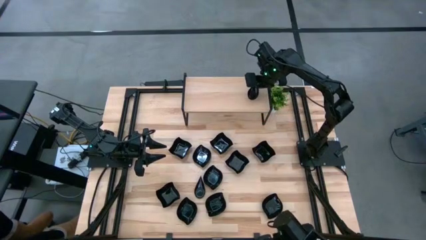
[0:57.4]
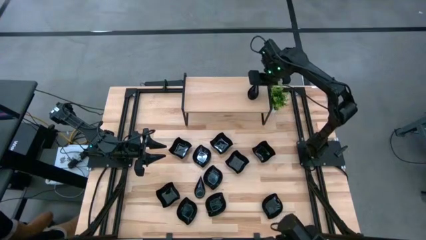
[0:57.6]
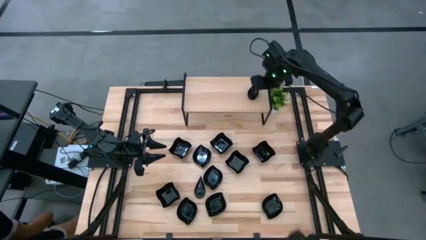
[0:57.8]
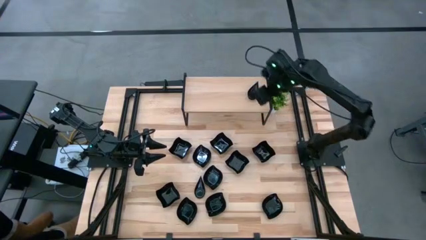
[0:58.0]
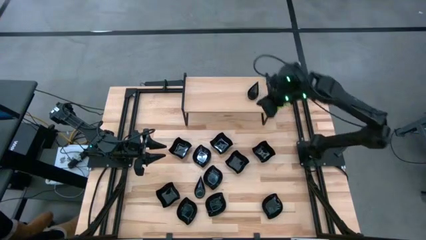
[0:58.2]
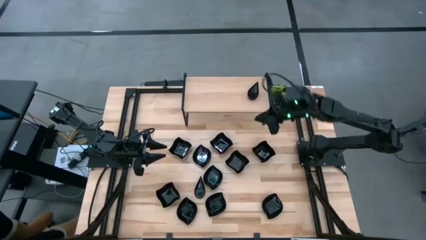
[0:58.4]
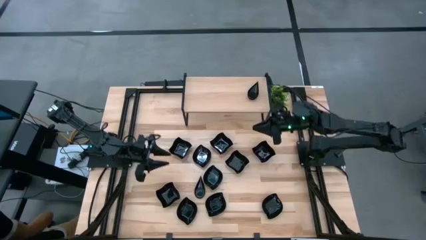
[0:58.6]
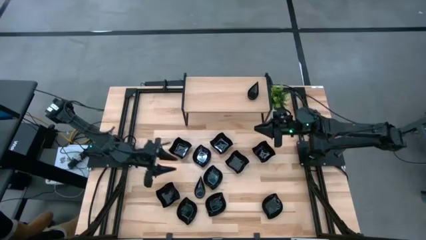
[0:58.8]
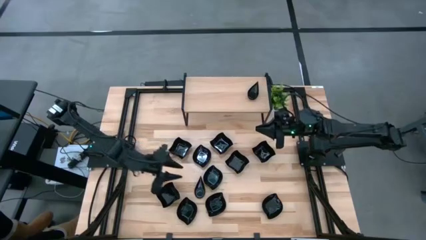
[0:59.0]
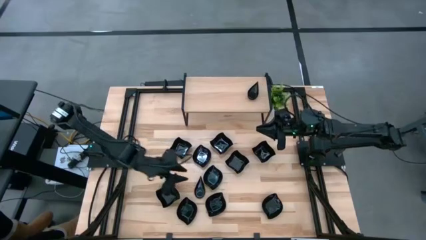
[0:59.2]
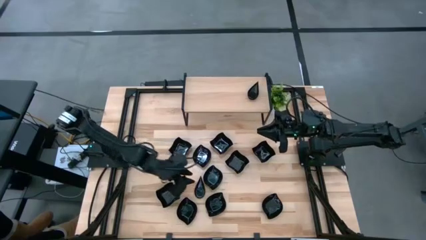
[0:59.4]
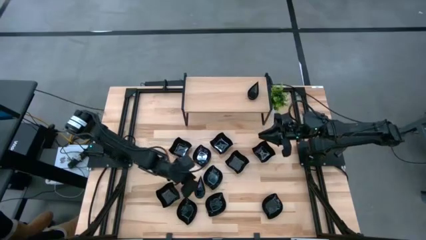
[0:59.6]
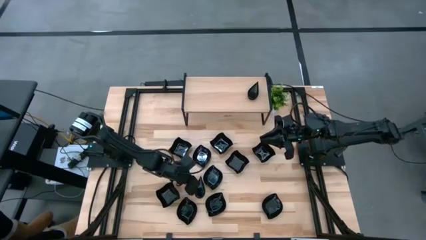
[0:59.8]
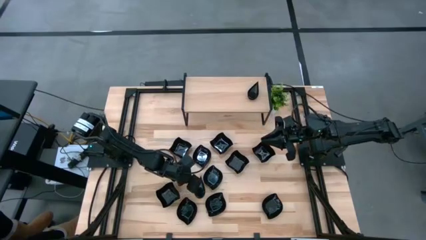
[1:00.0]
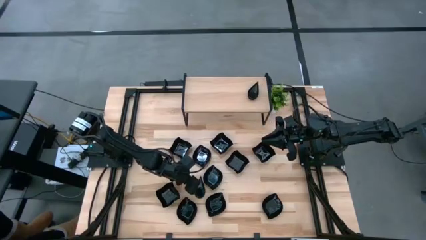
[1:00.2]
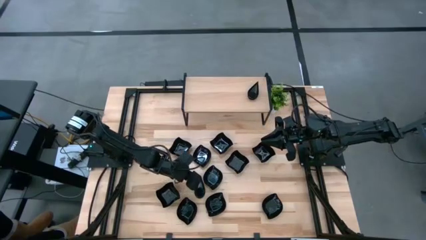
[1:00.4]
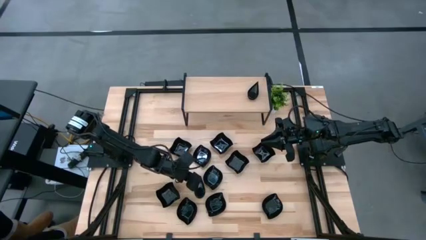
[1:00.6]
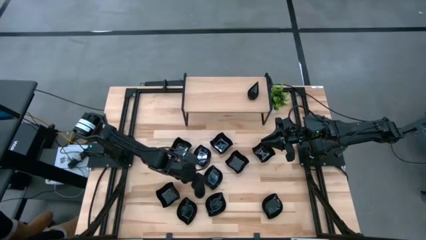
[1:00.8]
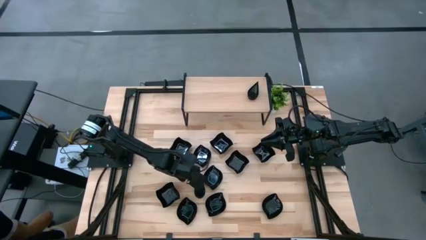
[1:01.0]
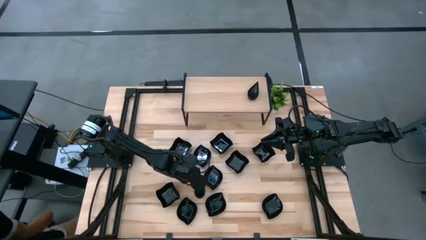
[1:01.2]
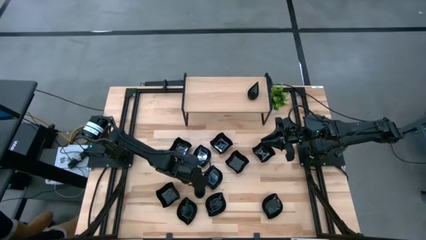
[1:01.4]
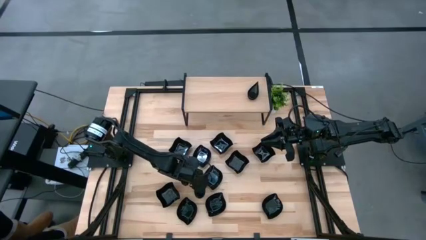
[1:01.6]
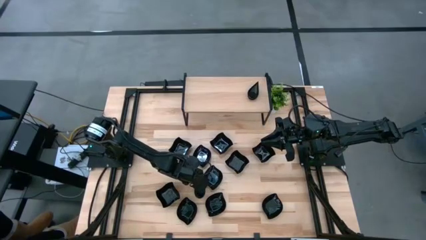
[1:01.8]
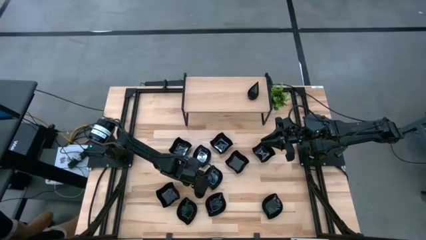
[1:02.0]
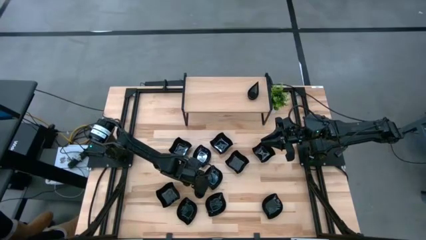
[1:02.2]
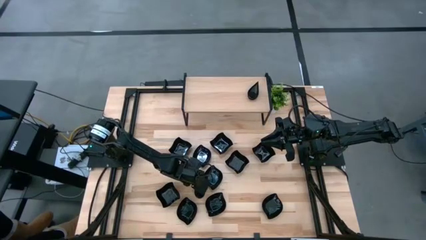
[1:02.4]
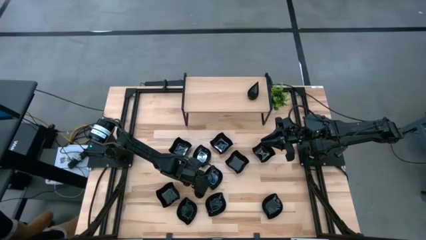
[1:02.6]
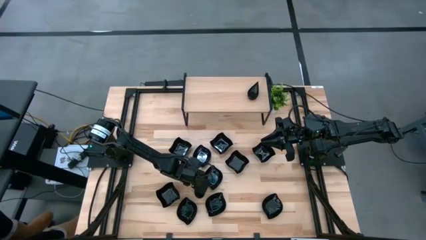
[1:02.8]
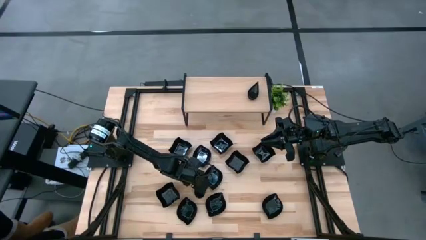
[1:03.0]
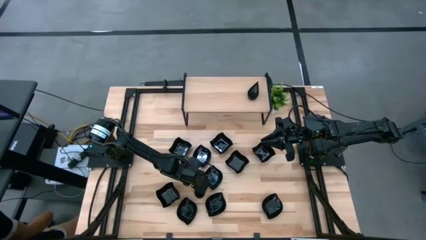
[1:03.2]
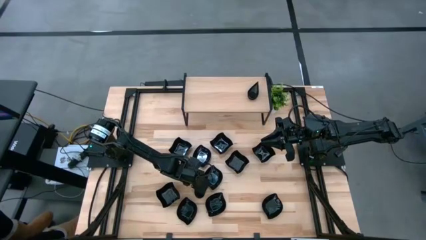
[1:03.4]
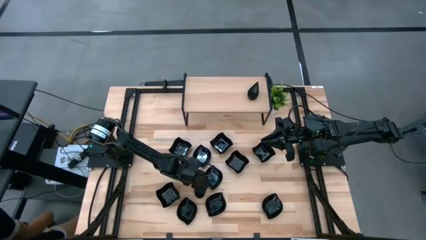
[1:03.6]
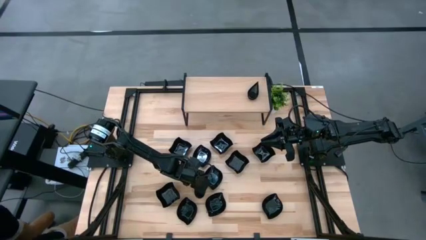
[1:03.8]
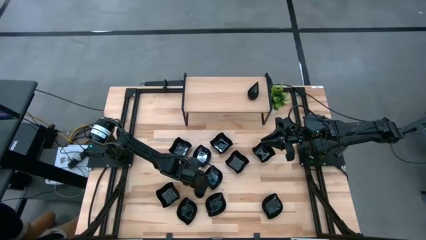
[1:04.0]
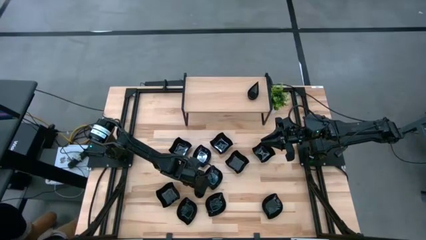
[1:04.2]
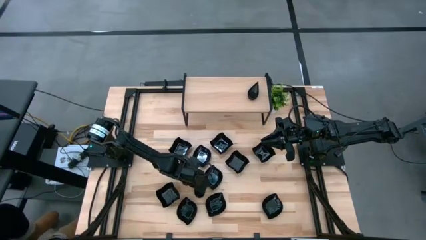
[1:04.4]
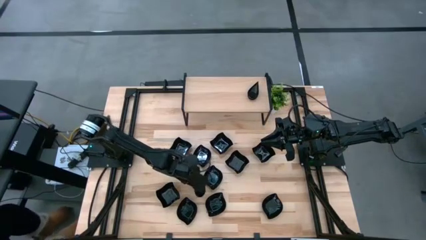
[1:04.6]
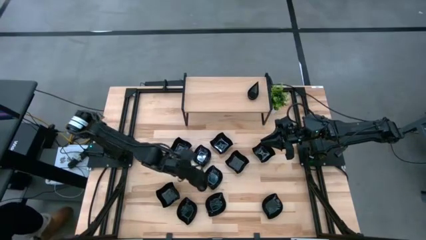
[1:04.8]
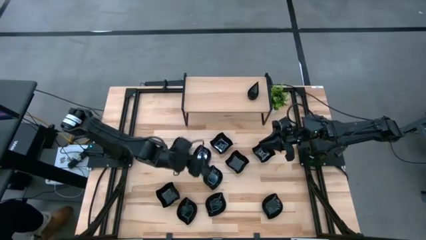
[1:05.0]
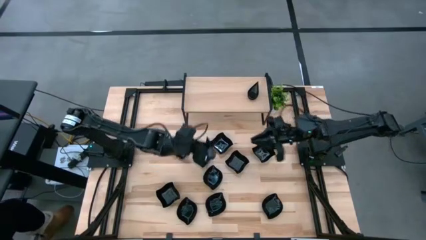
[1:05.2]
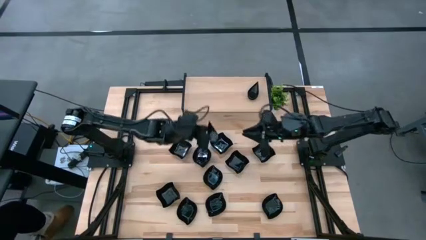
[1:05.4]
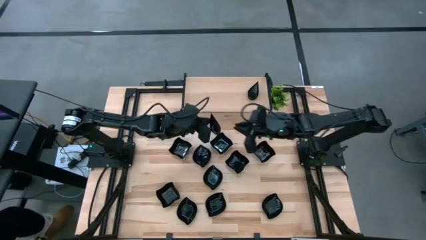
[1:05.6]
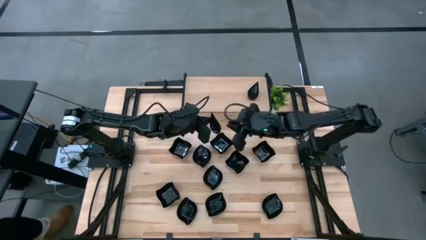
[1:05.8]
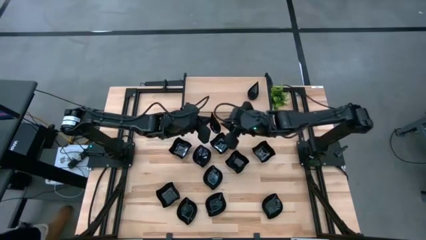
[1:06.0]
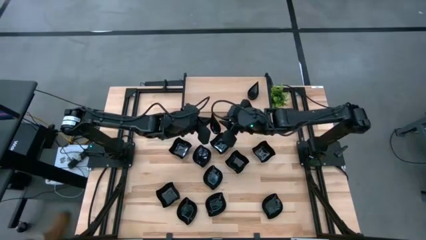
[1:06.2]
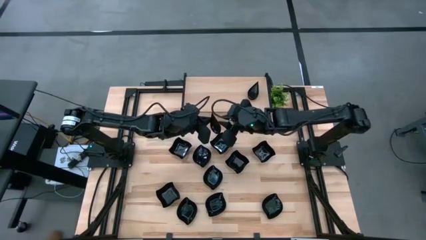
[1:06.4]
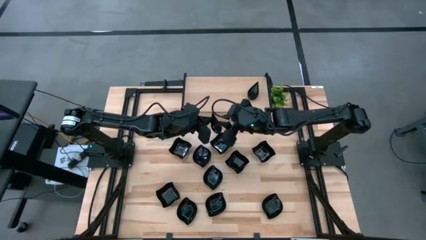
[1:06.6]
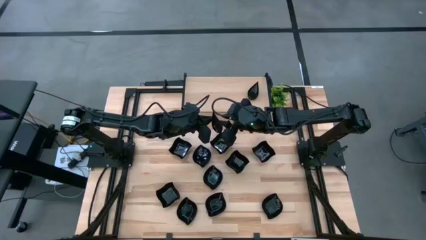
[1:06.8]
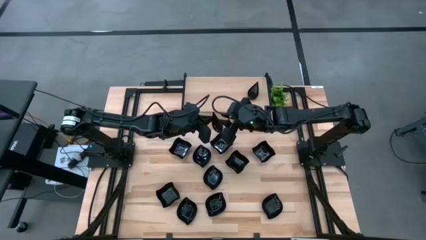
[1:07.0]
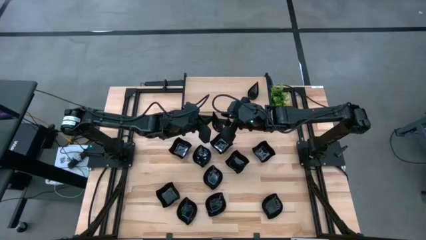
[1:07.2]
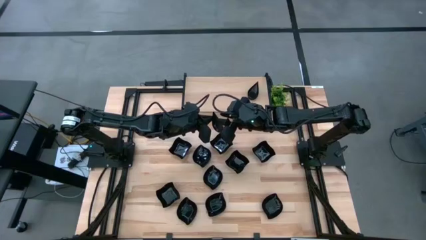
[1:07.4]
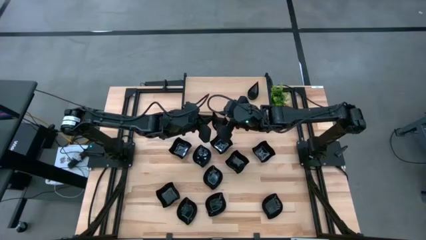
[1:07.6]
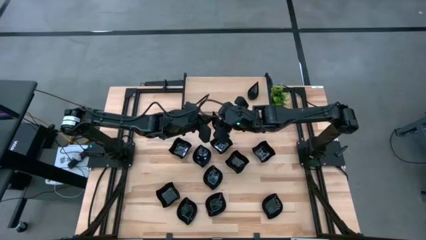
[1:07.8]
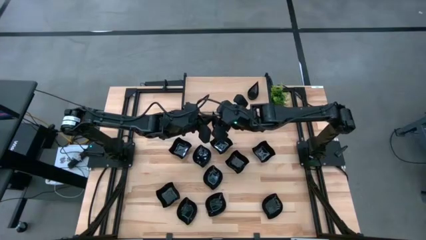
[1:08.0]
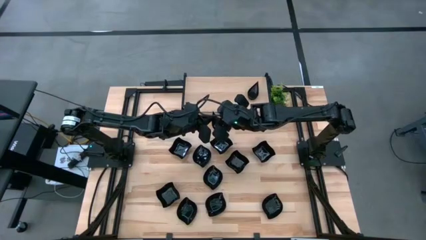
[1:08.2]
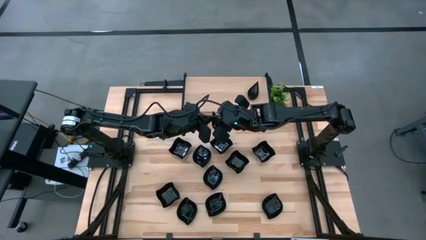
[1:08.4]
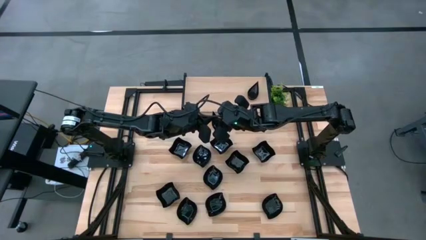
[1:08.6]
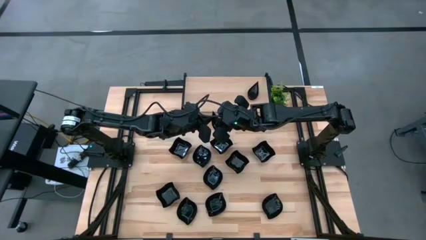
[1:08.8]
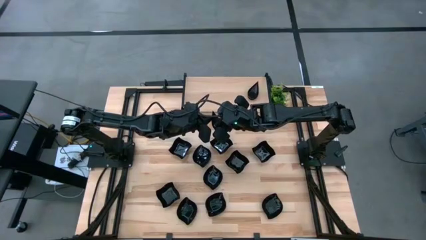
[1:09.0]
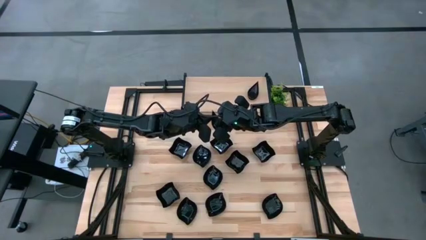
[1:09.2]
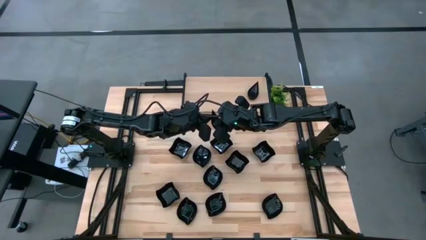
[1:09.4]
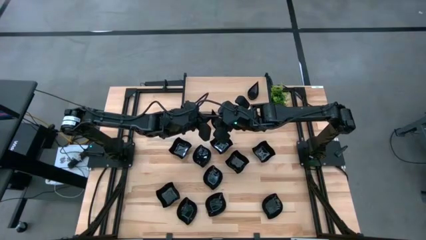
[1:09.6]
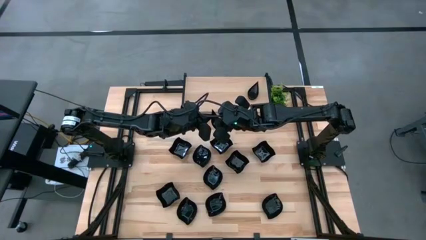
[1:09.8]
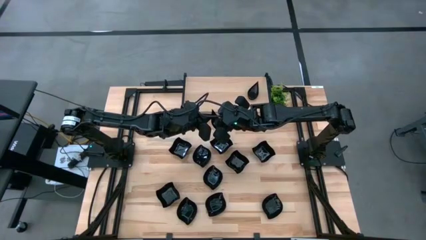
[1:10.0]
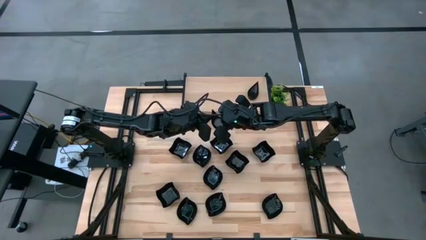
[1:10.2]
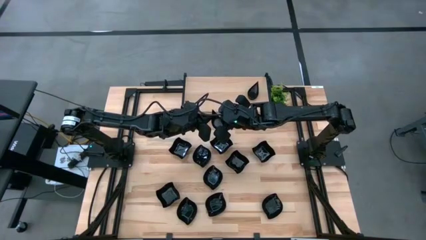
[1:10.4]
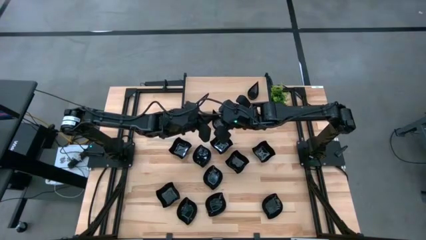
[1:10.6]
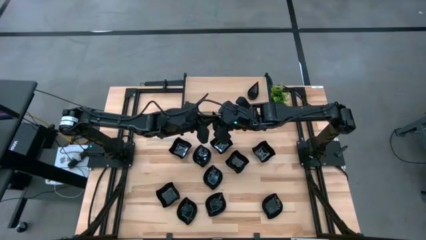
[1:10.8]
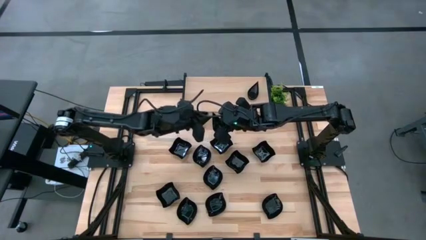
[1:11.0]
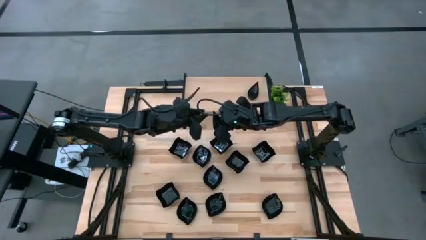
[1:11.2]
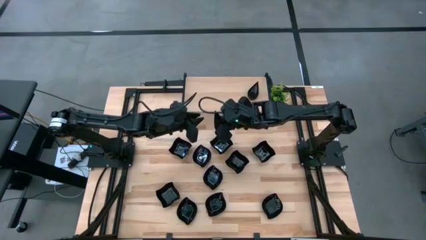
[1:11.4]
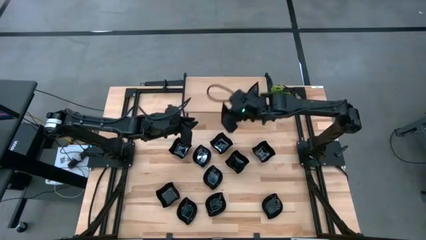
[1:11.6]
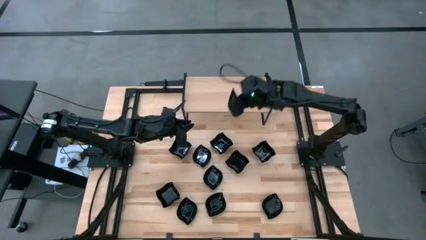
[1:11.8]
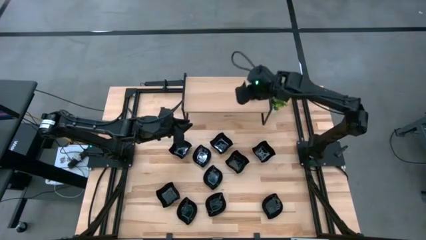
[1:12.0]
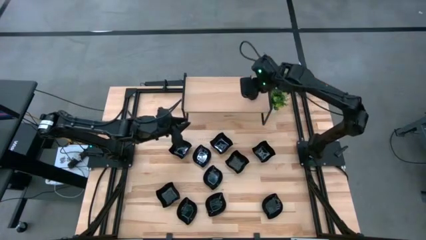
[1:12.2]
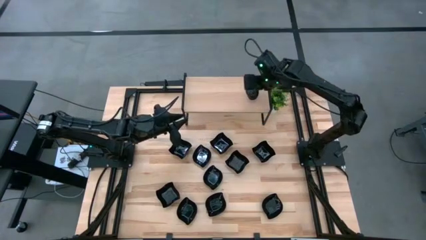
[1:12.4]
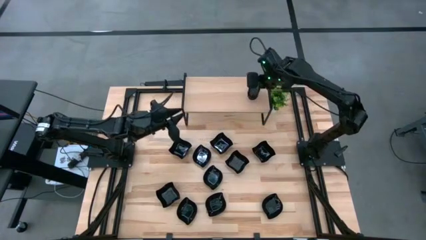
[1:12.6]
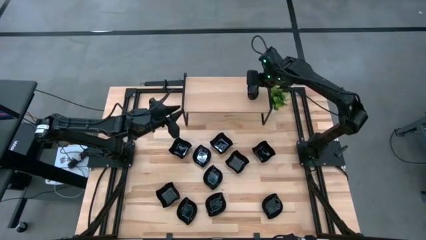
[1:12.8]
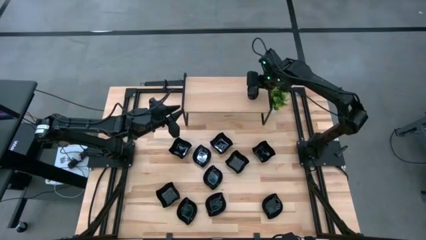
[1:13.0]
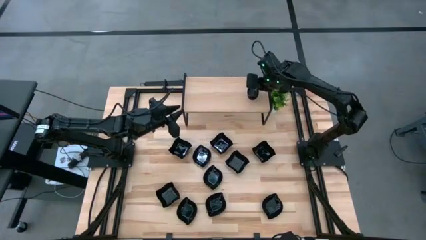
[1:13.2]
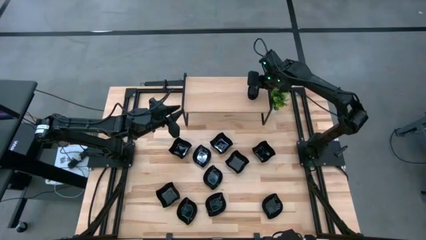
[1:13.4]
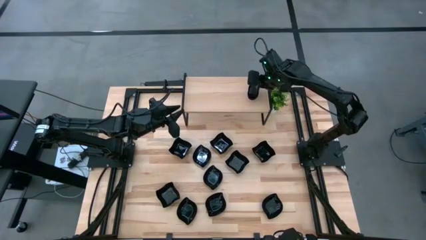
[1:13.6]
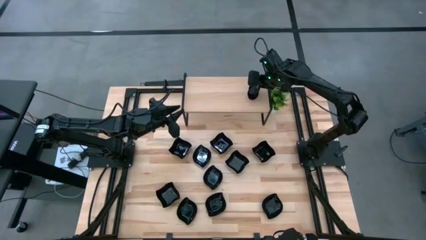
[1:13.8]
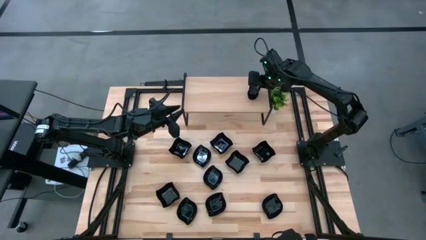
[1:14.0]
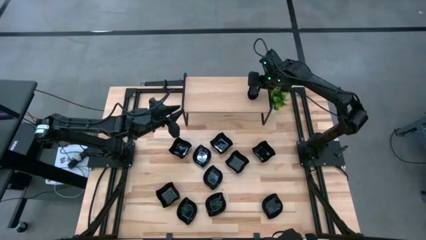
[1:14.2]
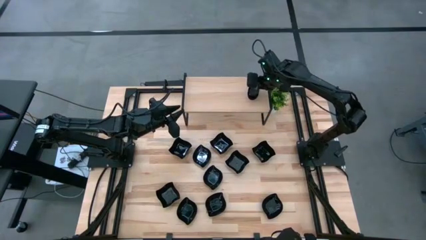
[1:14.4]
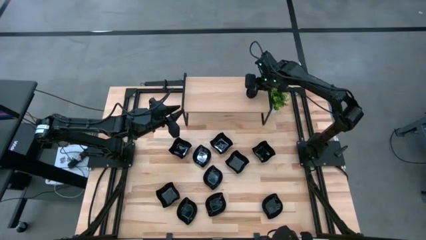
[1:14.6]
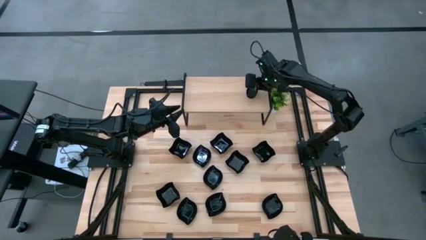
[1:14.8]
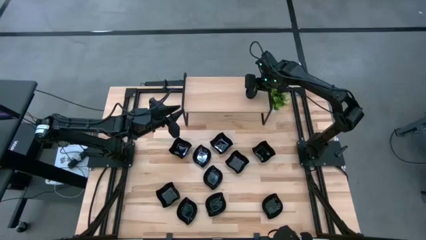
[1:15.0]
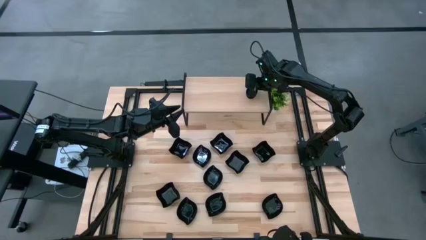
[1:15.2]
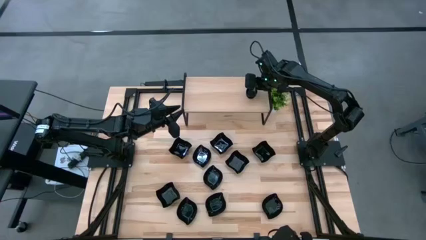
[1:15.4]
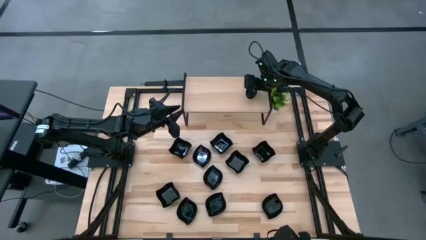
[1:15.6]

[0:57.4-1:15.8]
Task: Pick & Place Mini shaped plates
Stack the black drop shaped plate on top of the other black drop shaped plates on the shelf
